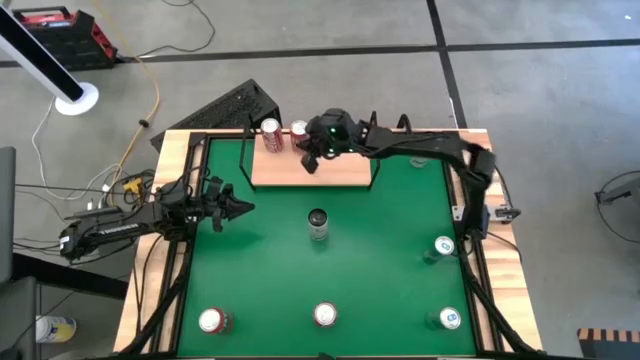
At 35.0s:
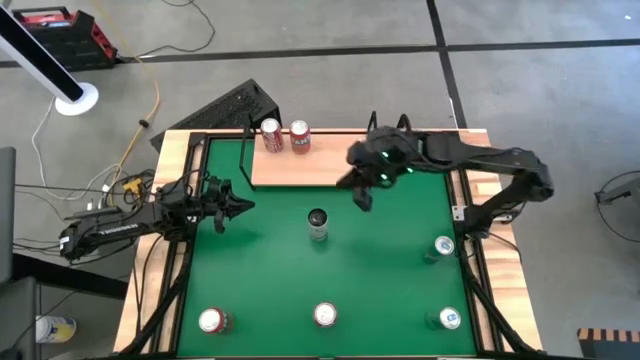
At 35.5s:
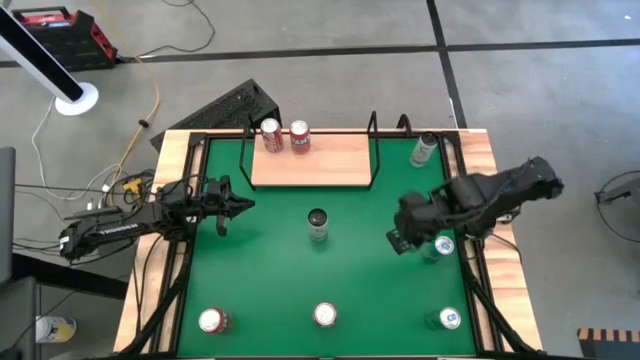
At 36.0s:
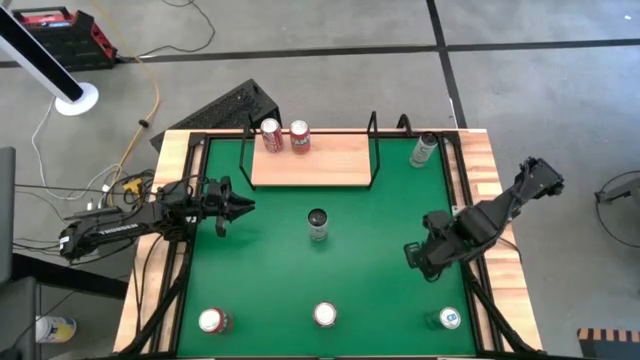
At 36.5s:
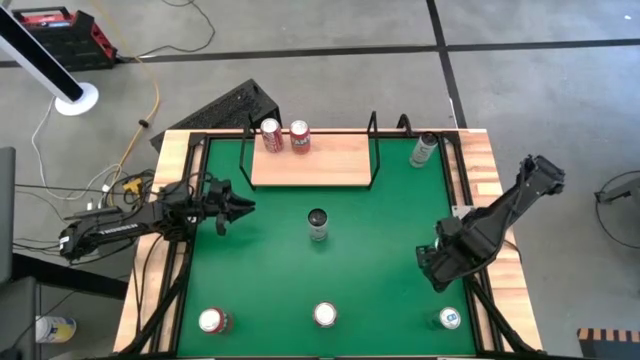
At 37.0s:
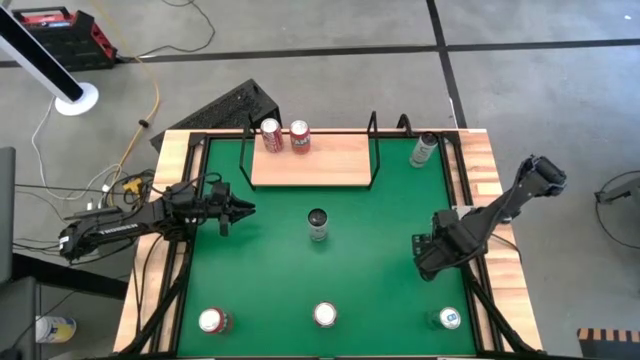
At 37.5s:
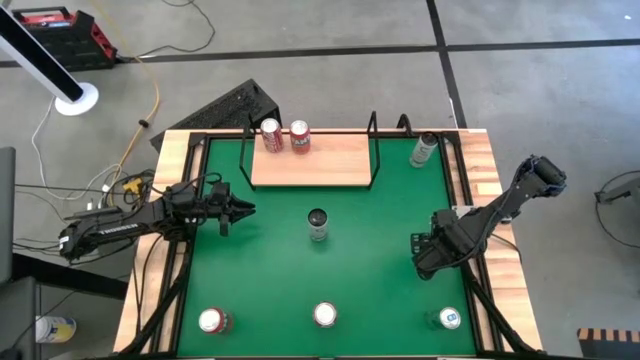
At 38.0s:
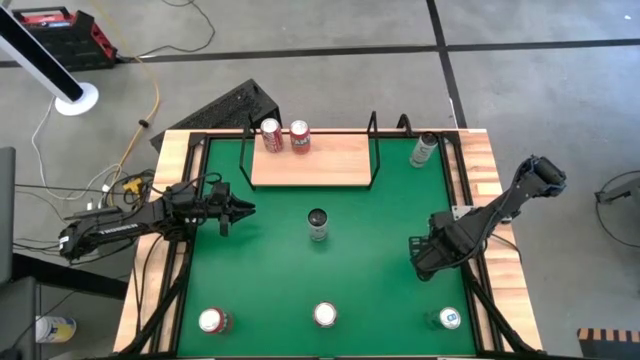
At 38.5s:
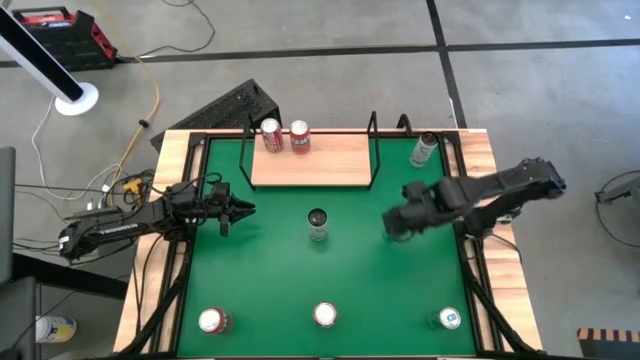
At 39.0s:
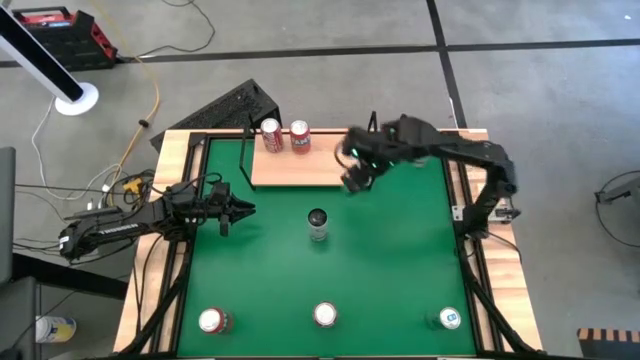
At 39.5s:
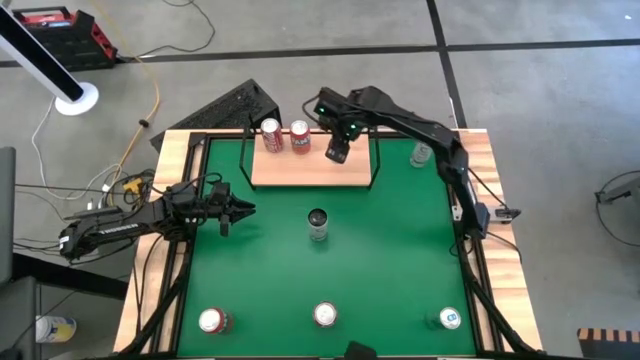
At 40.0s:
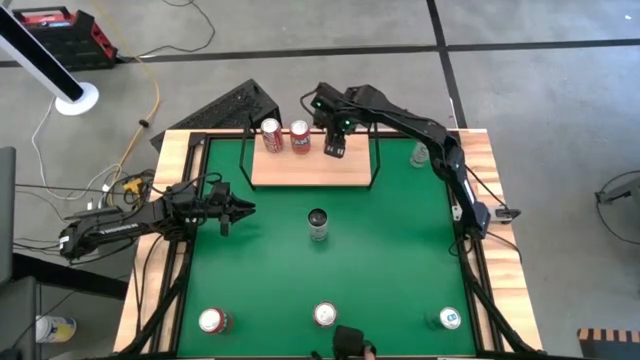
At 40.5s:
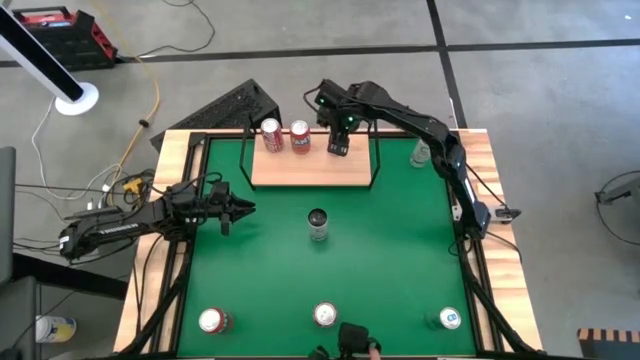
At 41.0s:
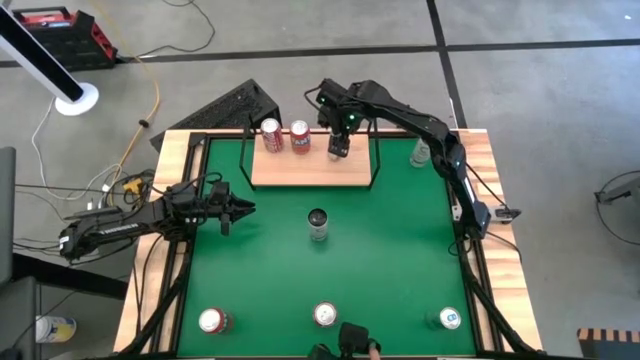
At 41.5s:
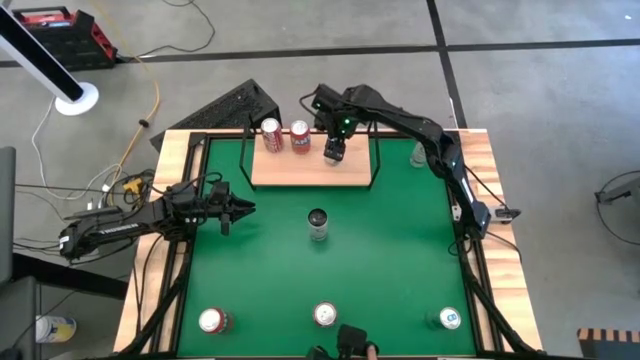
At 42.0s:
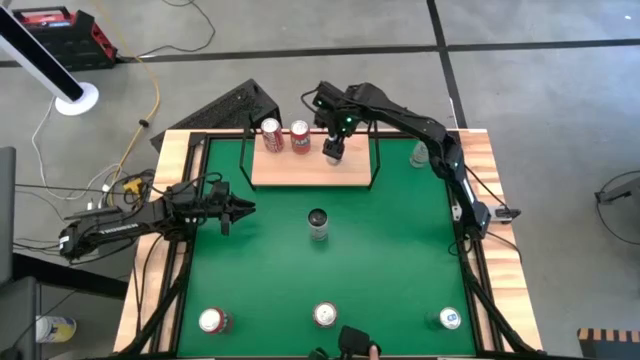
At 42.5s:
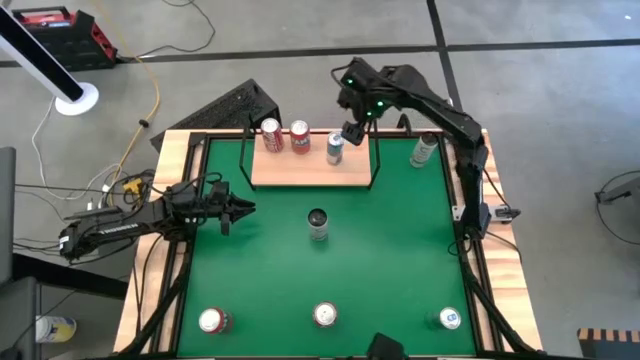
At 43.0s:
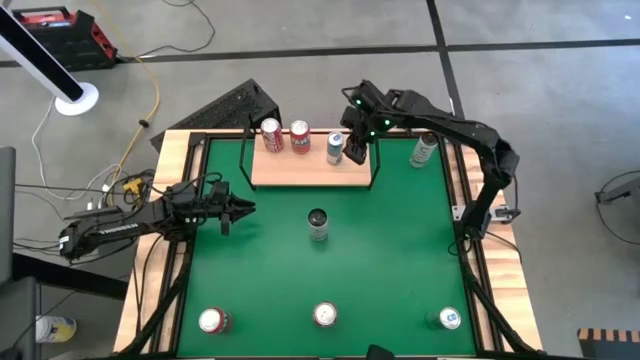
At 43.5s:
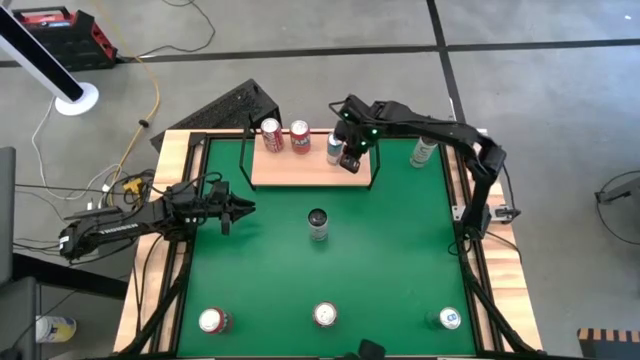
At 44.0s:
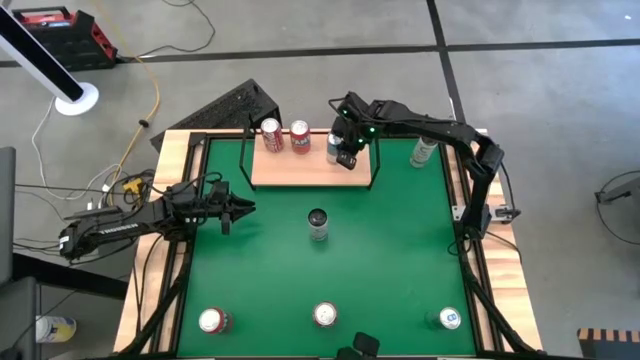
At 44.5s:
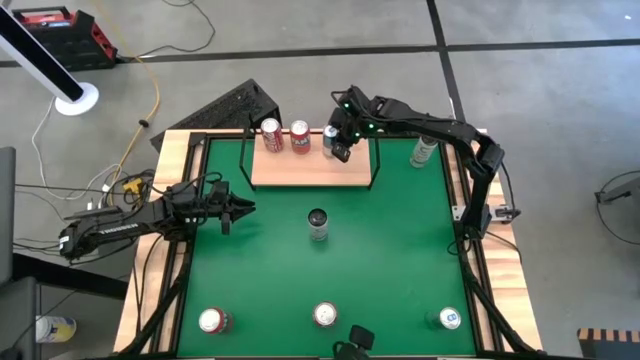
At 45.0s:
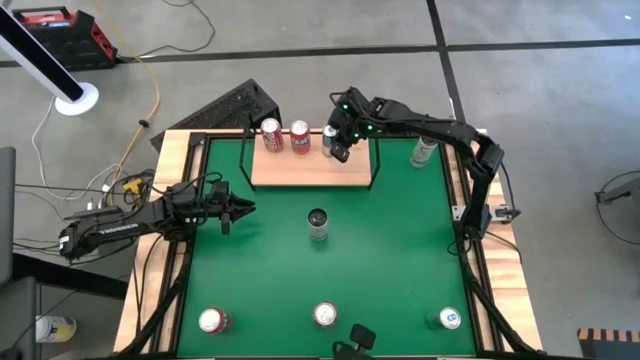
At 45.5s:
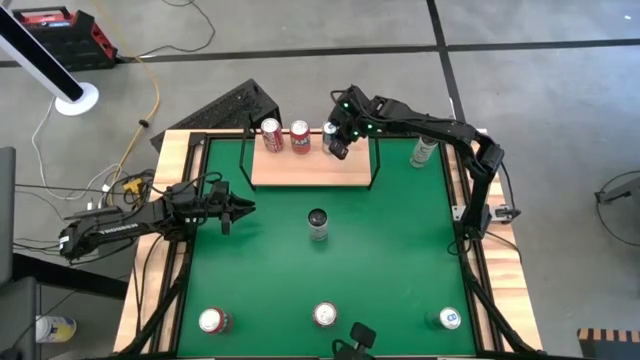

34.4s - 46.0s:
Task: Place canned beverage on shelf
Put the top blue soda can on the shelf

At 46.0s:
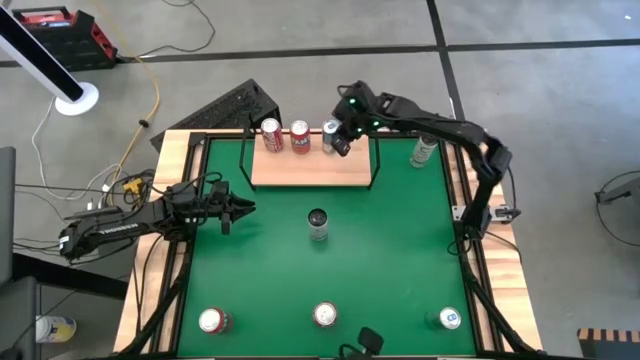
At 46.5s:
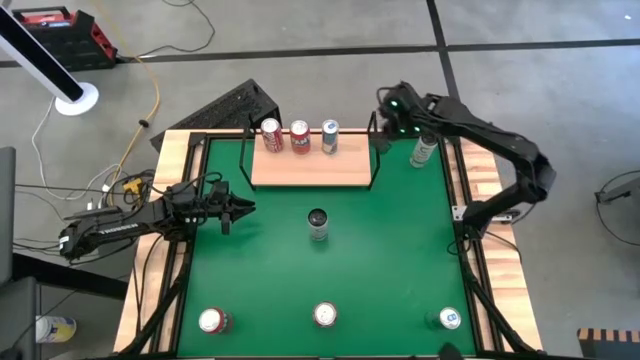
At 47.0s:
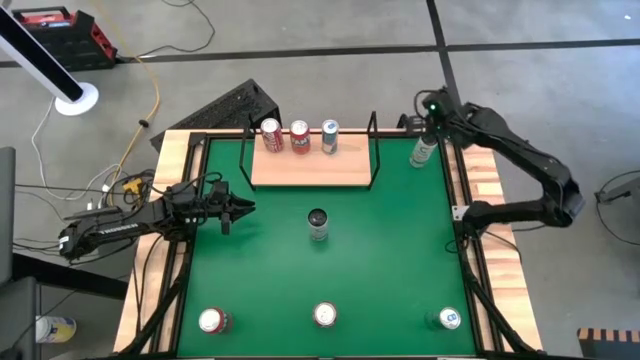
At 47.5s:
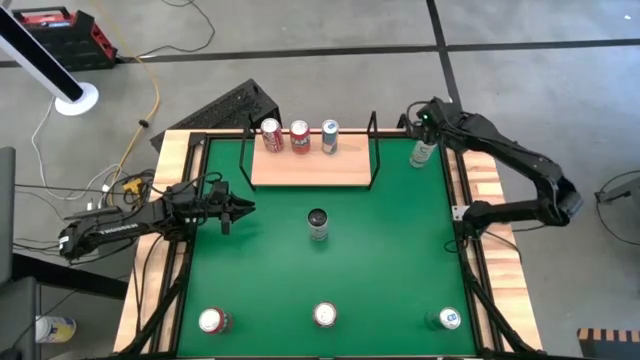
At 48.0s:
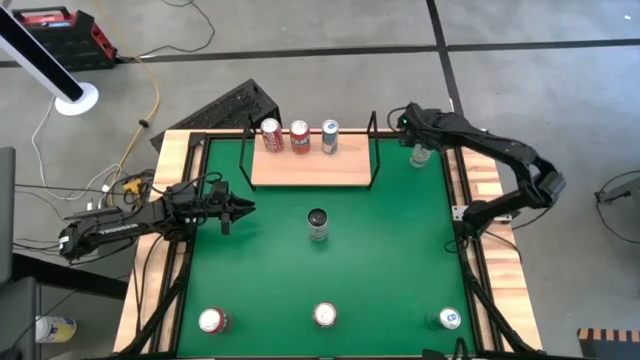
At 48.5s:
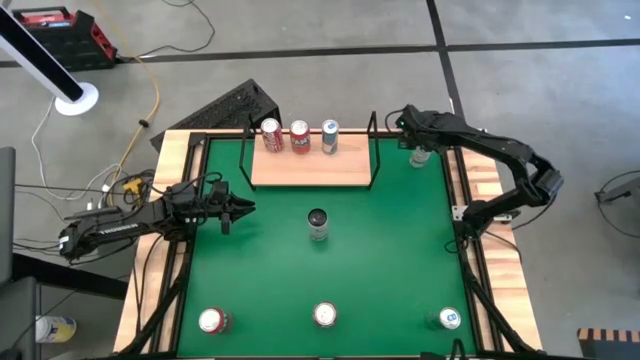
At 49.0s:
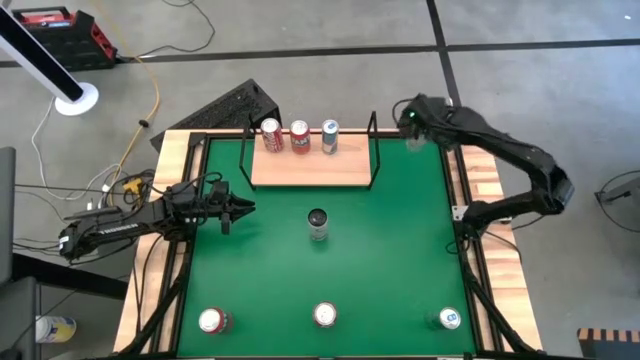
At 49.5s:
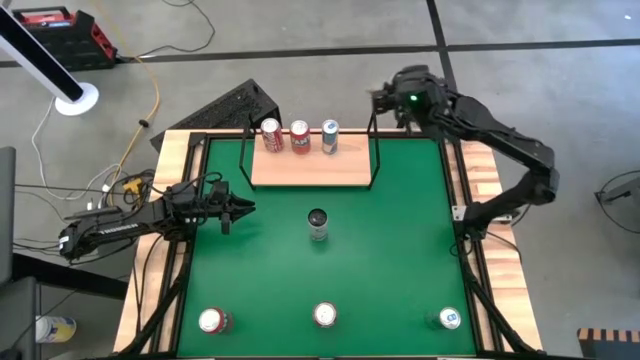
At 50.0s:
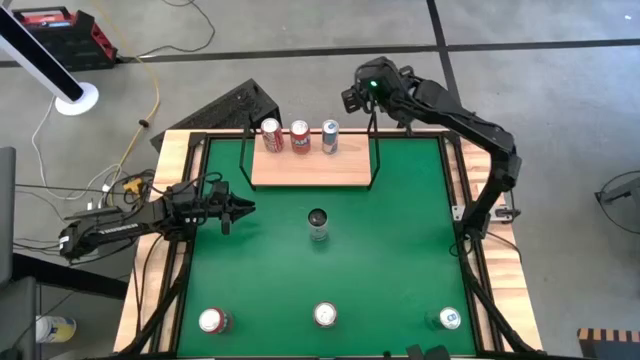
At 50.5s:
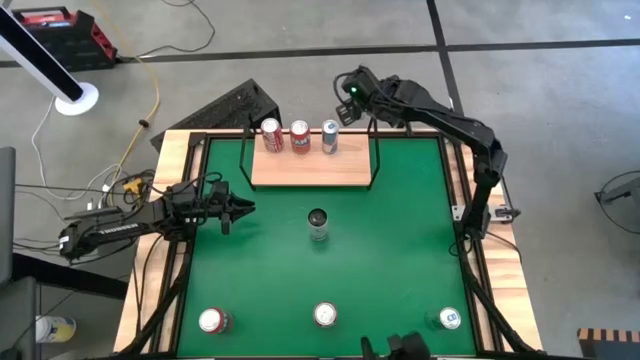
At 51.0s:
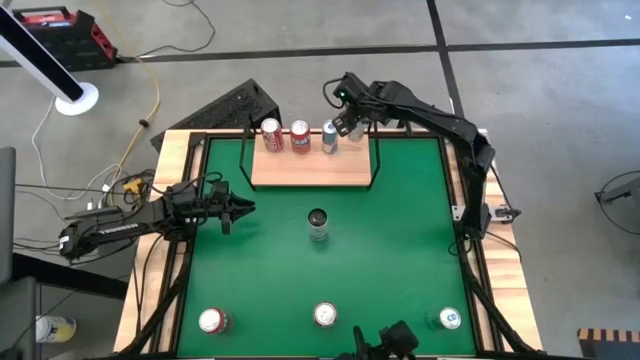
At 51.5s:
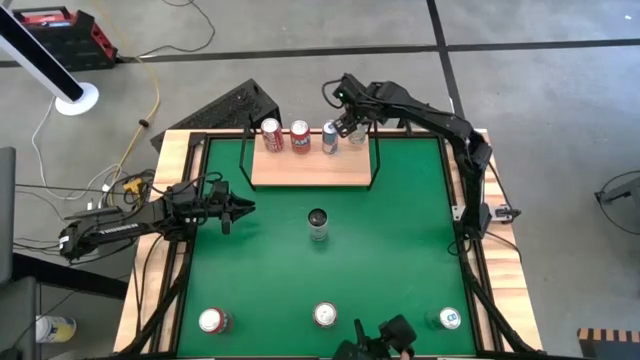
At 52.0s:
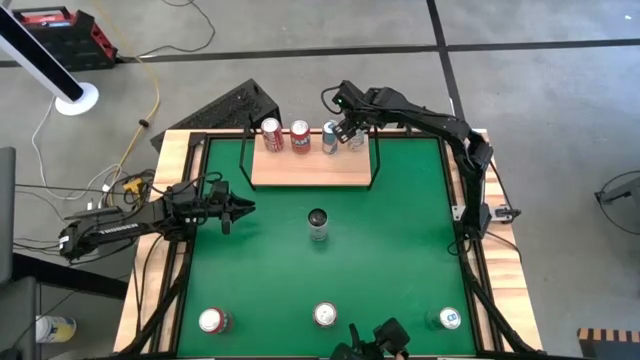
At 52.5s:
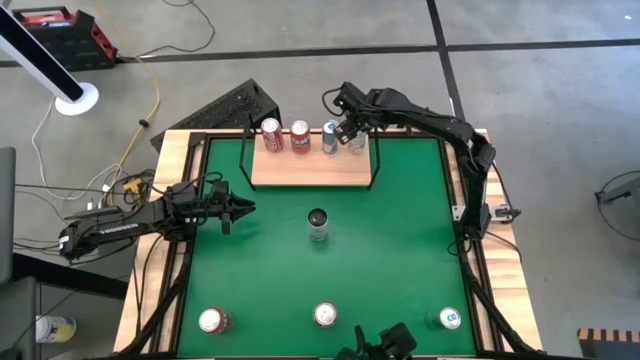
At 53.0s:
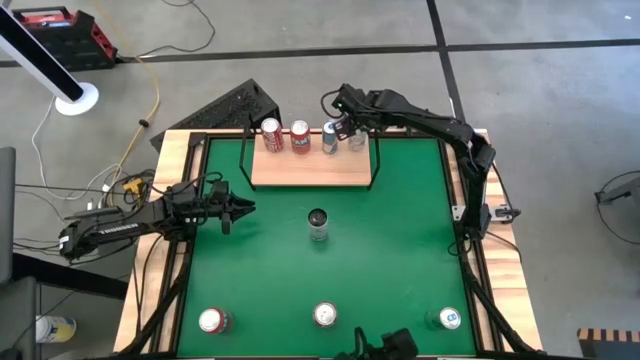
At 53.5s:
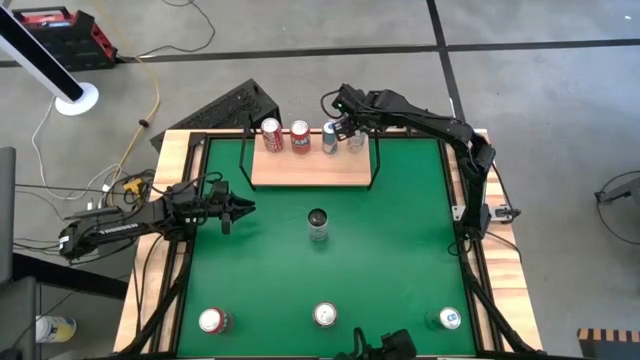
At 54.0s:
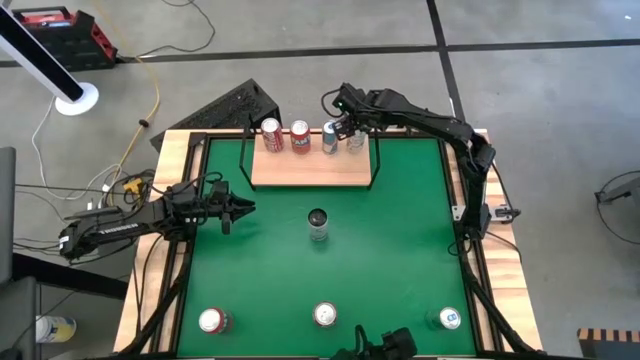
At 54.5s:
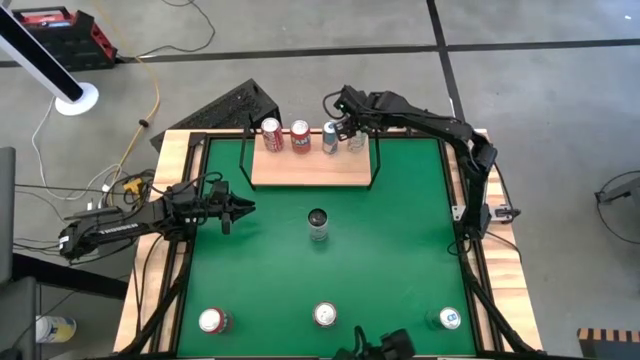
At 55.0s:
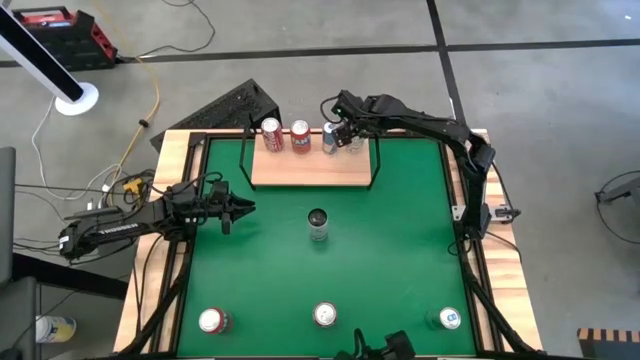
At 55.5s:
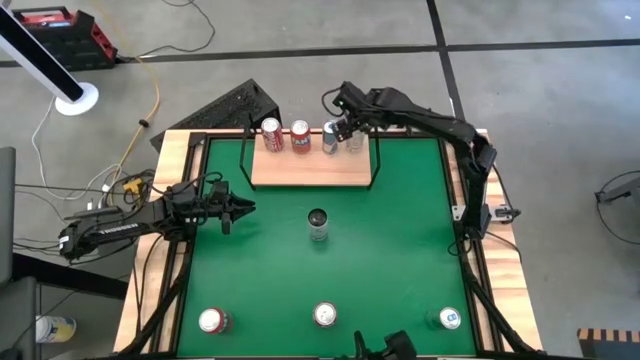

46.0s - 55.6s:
Put the top white-yellow soda can on the shelf
